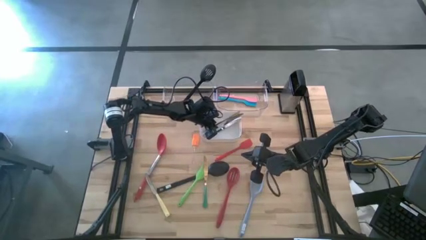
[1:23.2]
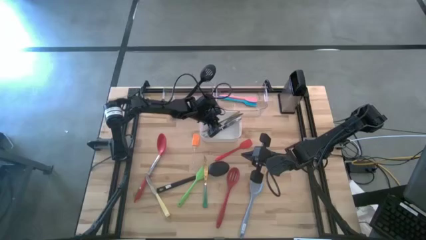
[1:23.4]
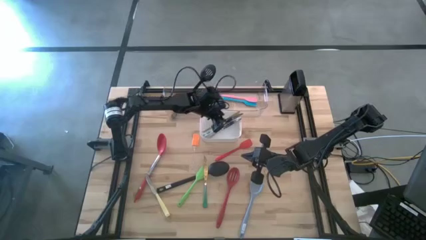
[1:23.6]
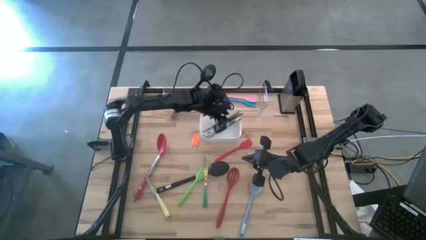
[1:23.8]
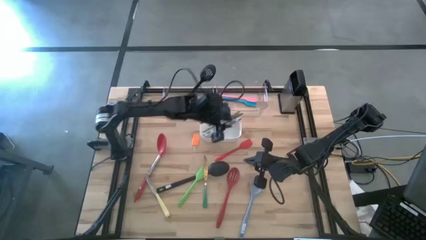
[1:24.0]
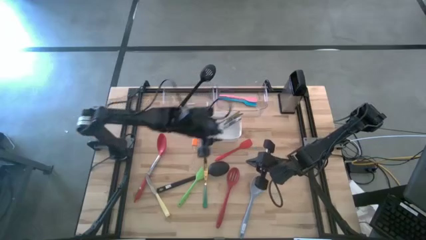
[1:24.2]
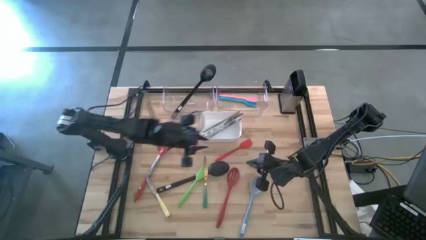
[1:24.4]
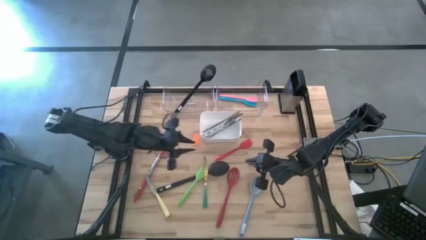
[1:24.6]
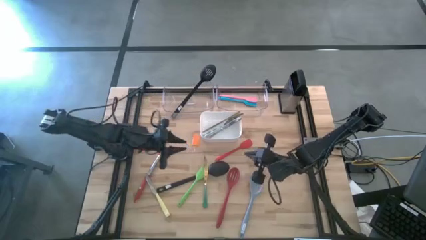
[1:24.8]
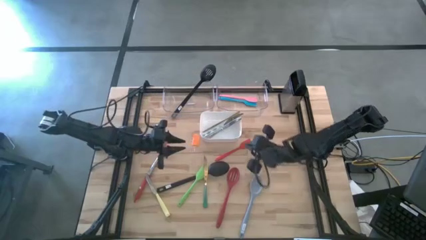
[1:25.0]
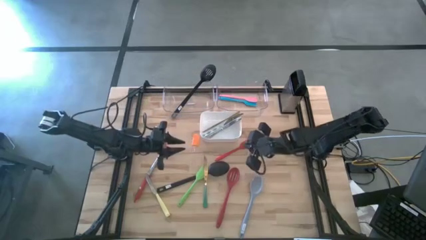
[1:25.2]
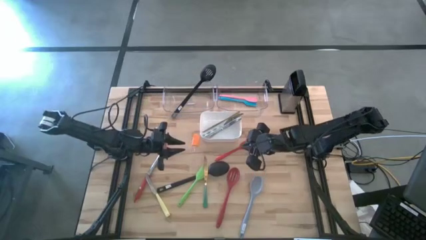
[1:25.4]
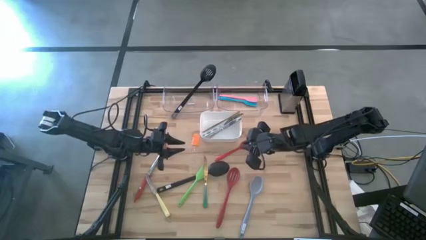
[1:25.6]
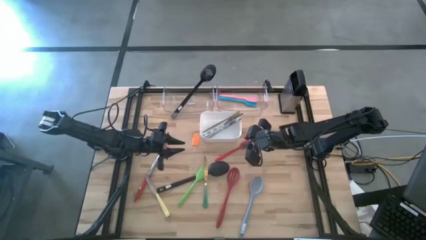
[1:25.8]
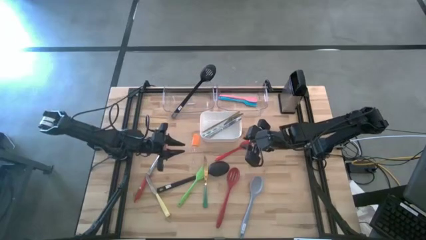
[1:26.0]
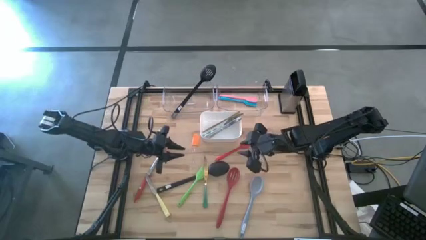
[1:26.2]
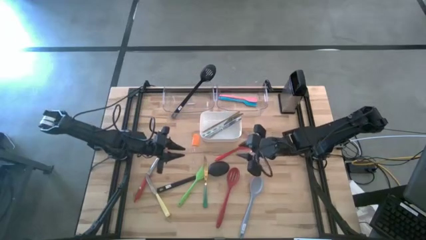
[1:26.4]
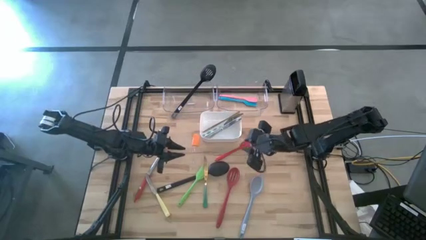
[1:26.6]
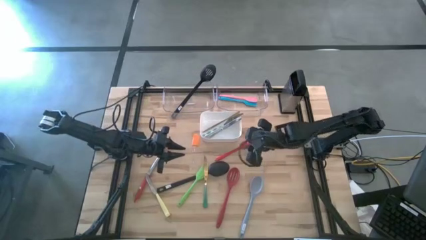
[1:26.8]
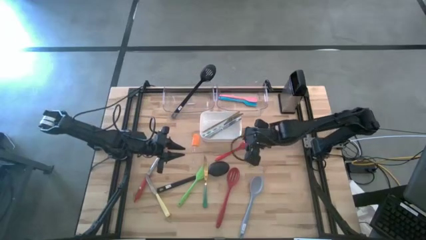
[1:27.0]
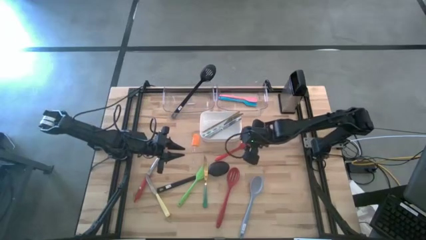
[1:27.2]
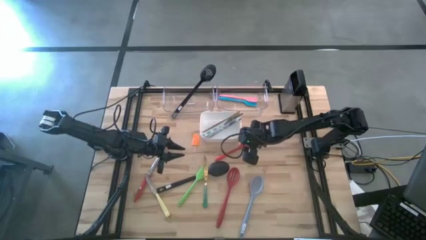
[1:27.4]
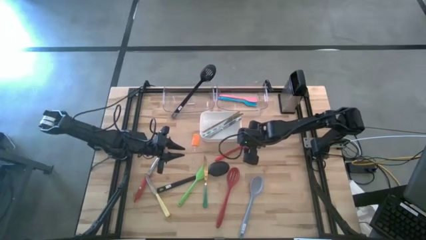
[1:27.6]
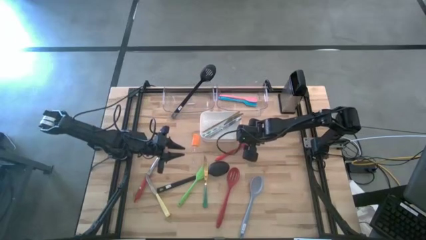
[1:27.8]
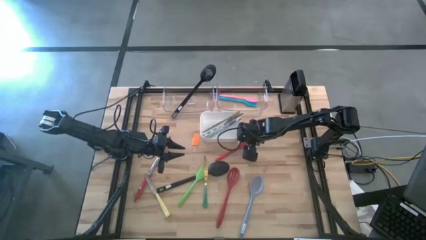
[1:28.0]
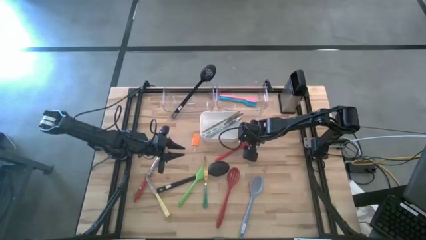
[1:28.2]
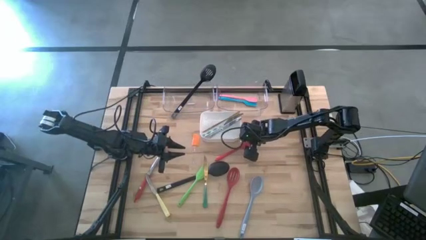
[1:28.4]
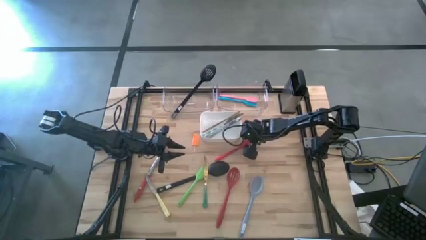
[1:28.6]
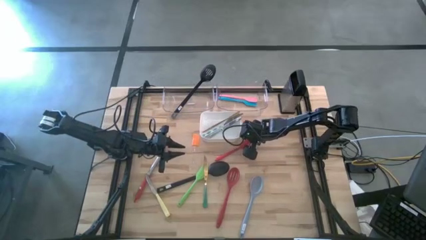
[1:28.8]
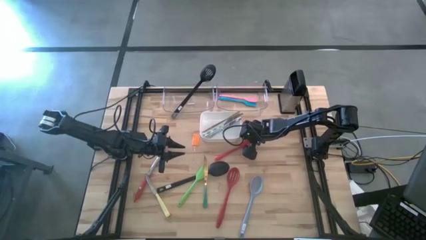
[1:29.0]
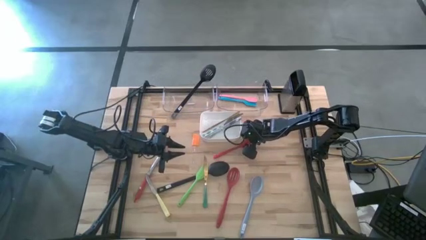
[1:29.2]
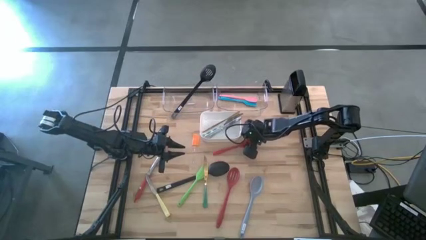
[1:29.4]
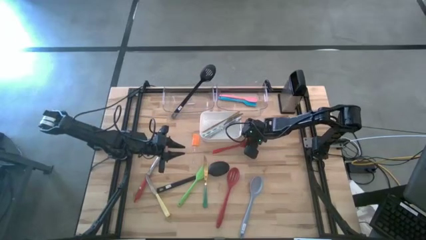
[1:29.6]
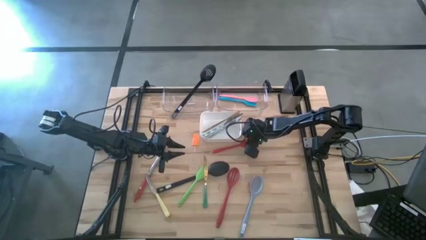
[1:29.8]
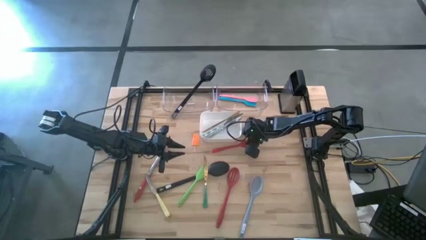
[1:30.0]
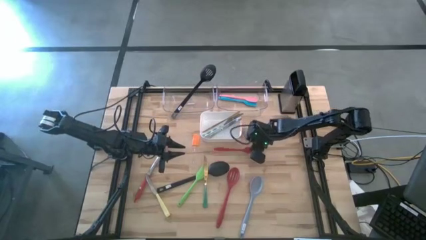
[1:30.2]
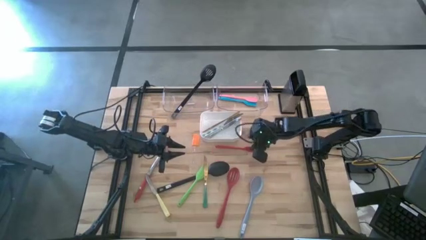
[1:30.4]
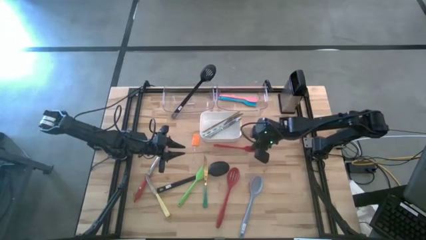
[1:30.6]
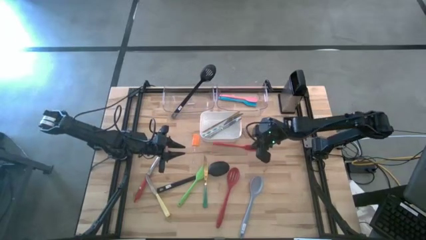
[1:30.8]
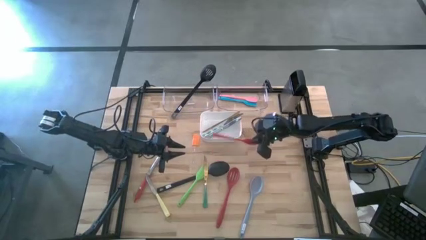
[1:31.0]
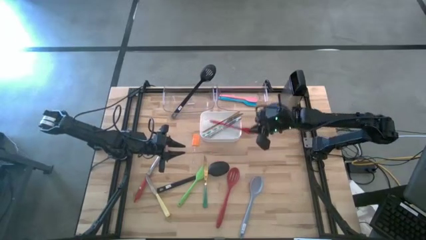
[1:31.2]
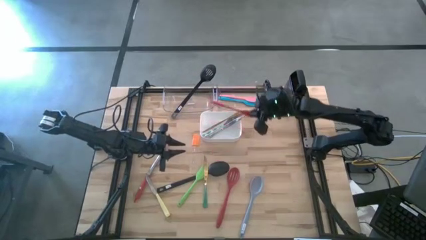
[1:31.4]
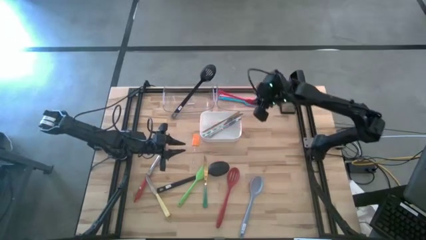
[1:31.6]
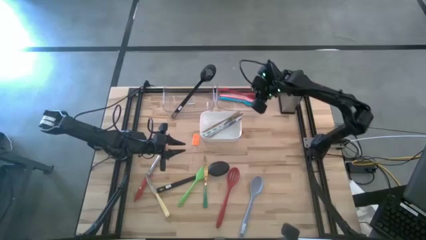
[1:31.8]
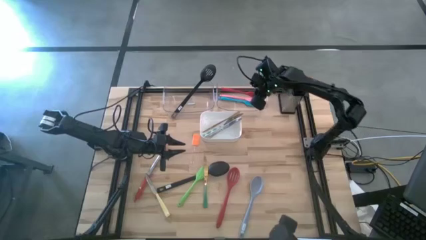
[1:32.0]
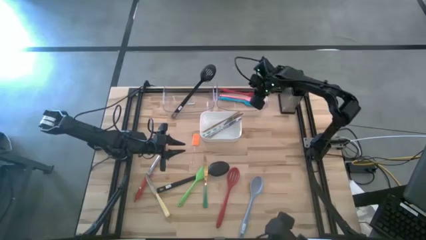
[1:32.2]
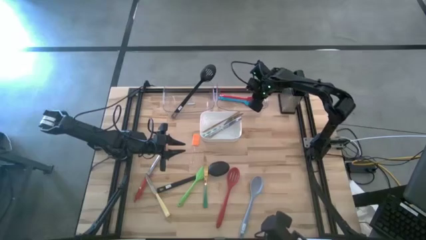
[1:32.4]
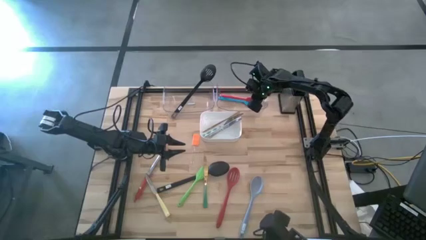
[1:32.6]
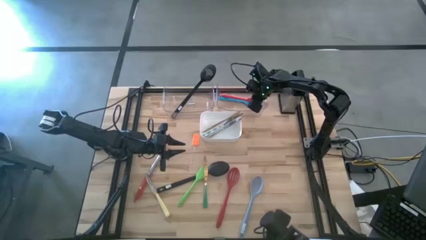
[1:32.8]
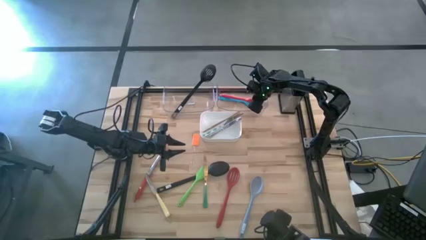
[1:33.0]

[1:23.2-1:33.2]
Task: Pick & Place Kitchen Items
Put the red spatula into the right transparent bin

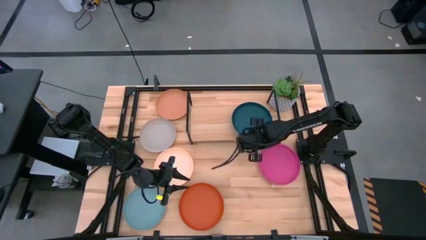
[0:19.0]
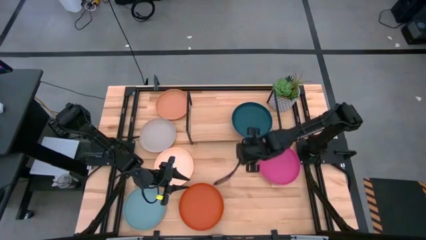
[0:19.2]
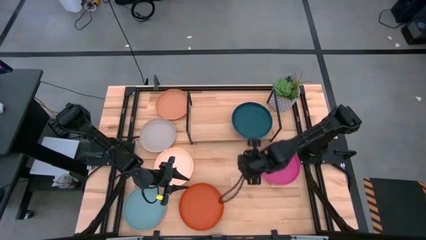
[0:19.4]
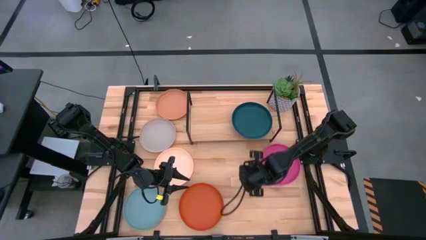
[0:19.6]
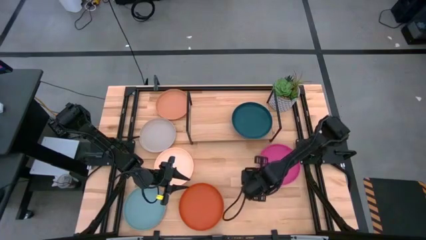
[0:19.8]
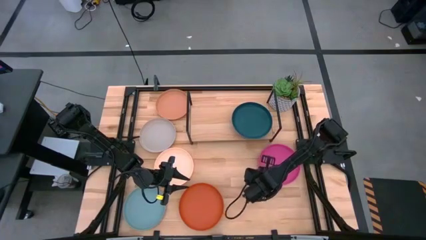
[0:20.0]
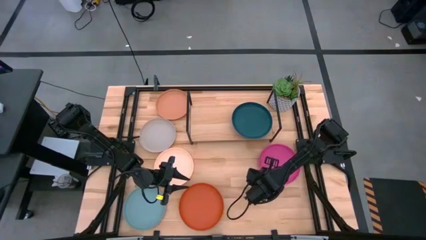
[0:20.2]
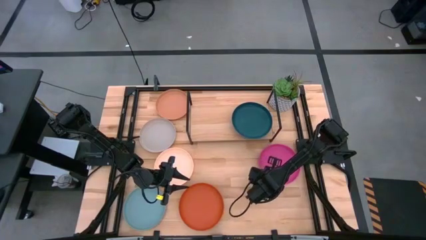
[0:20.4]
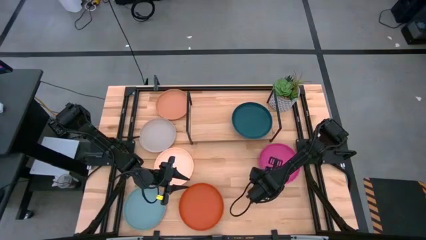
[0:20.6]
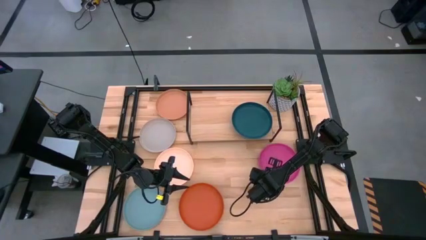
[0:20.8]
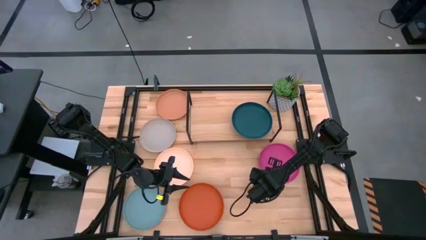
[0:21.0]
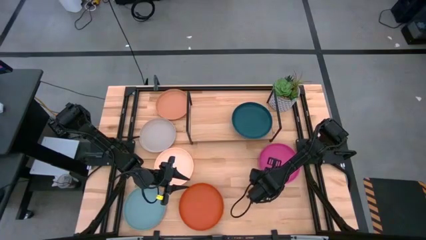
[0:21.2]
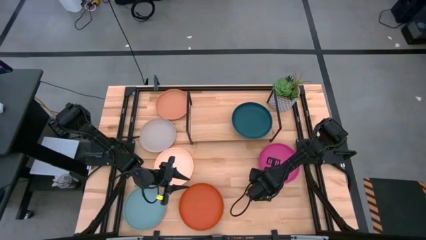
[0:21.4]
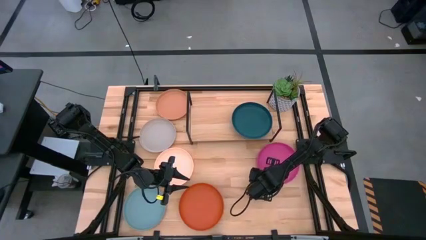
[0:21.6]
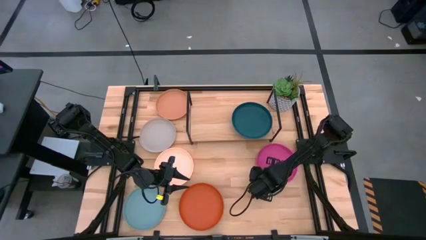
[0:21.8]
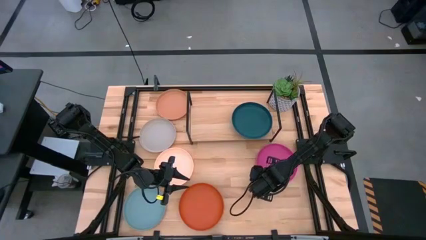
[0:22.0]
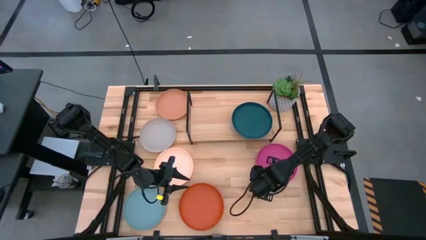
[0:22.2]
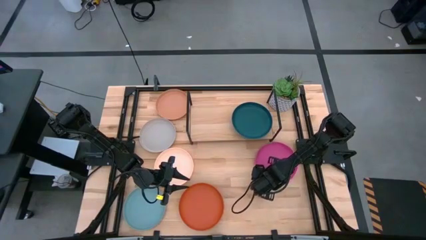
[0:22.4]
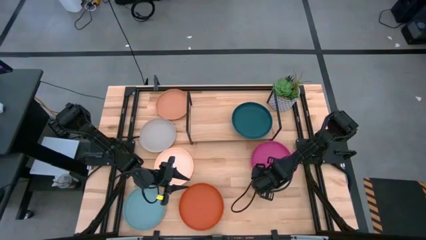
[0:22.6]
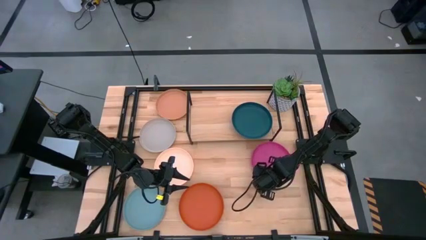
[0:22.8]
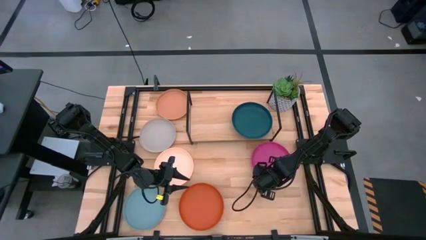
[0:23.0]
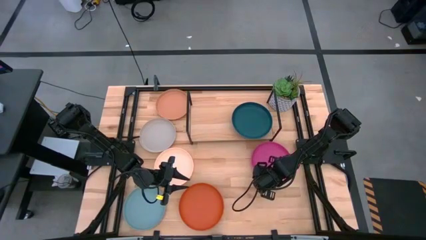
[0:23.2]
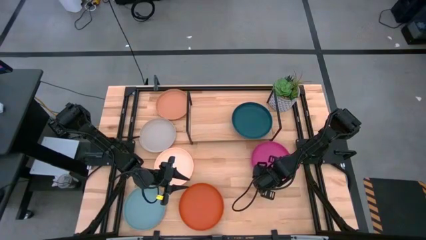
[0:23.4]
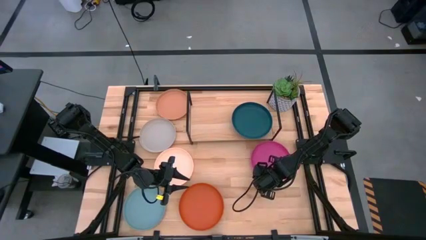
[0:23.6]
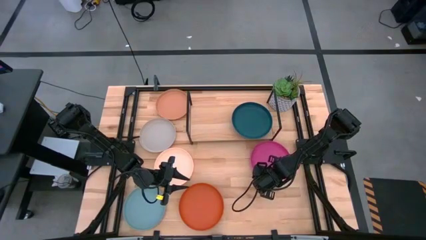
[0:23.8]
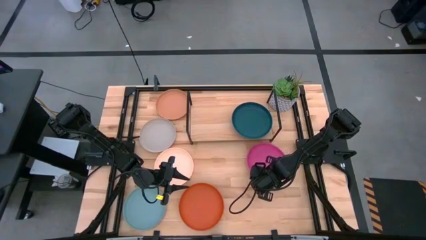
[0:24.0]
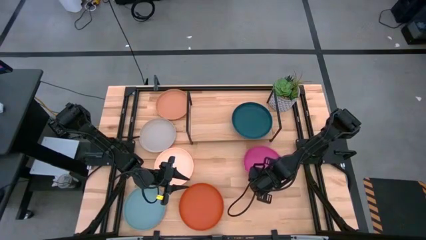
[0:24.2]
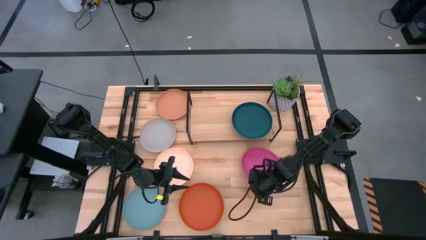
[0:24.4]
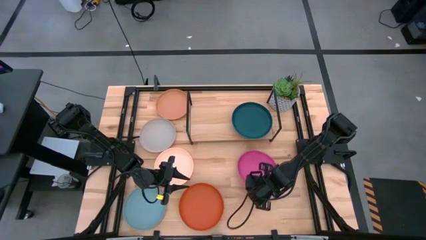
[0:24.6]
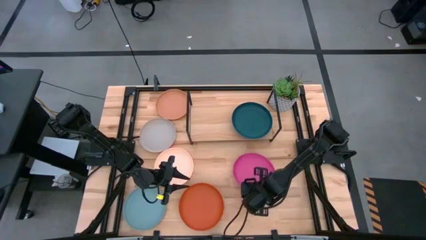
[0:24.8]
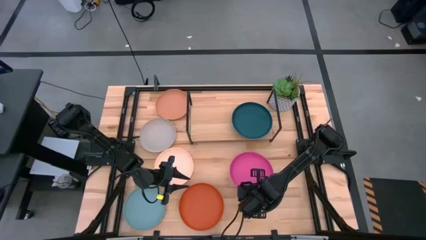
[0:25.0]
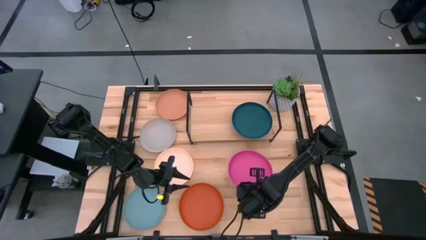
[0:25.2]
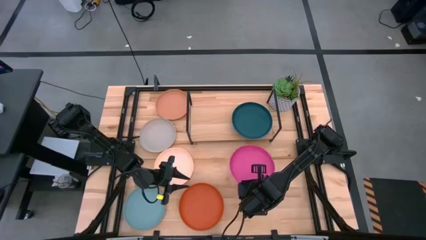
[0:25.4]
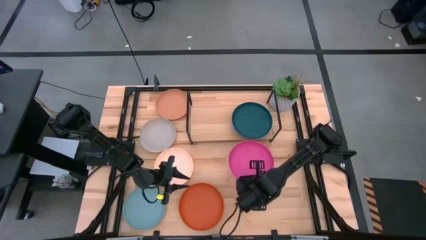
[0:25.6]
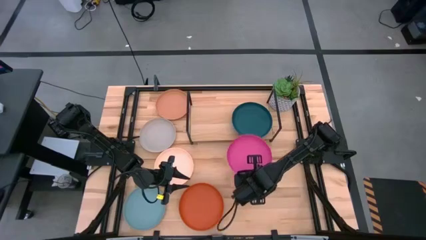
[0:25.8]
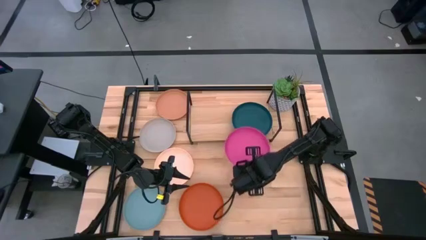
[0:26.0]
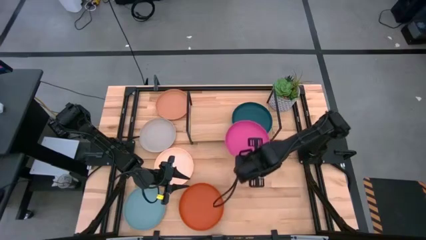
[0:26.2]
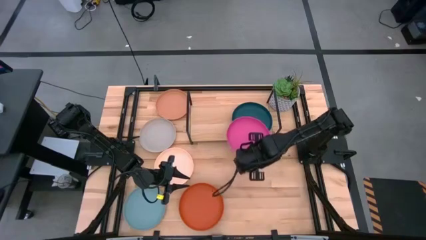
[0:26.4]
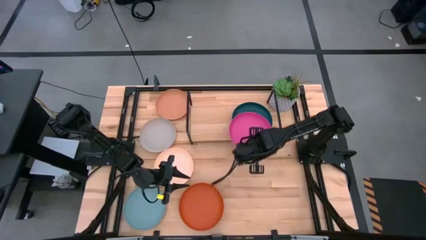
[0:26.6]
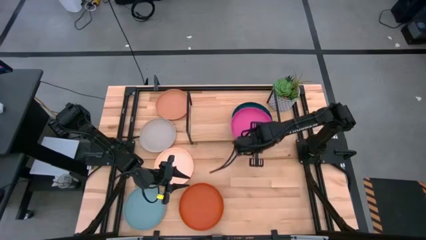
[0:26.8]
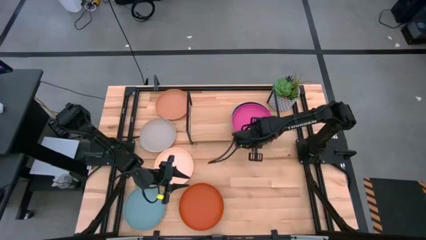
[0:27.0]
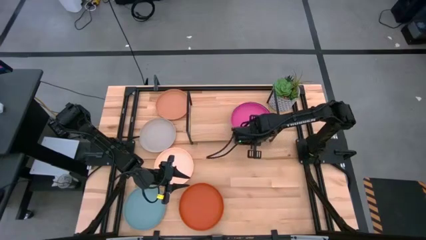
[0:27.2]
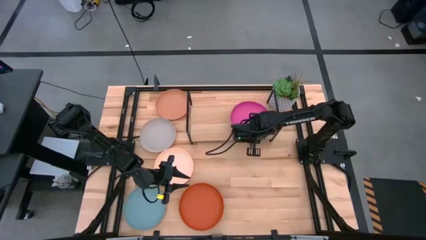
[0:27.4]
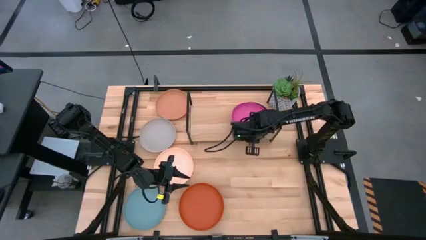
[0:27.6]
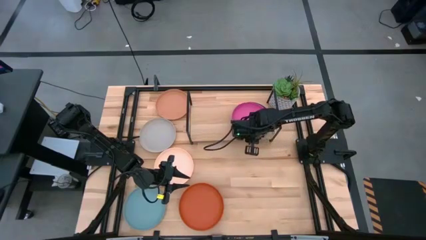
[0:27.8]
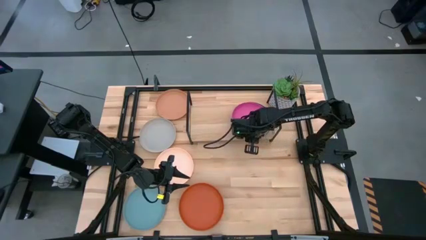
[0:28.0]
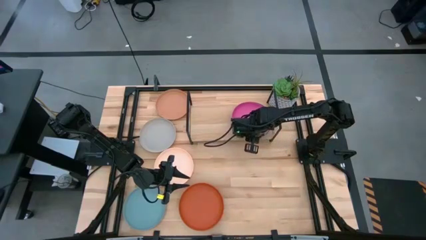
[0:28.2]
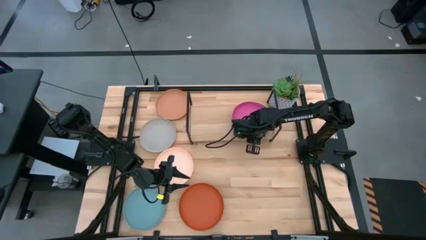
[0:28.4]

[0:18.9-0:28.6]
Task: Place and stack plates onto a shelf
Stack the pink plate on top of the green plate on the shelf
